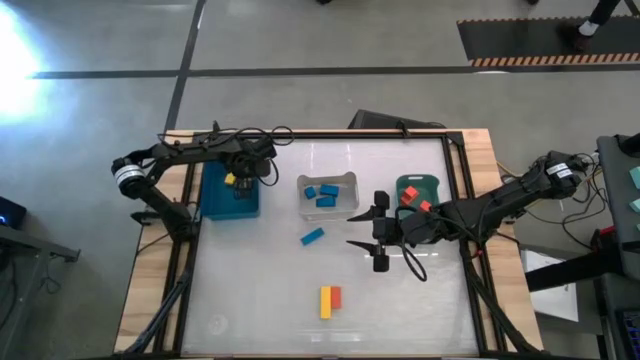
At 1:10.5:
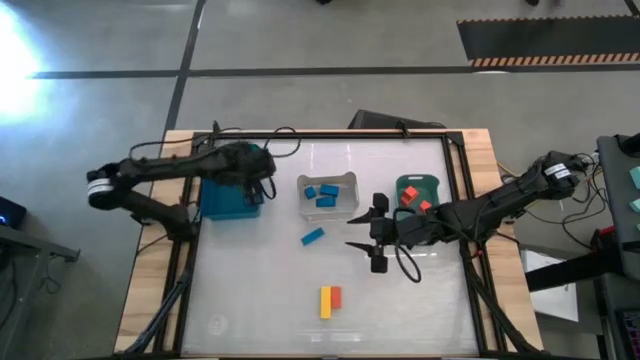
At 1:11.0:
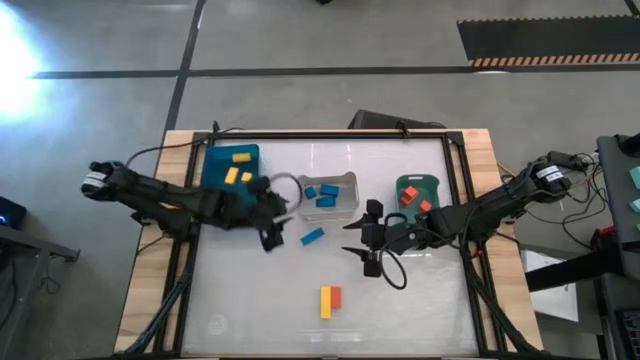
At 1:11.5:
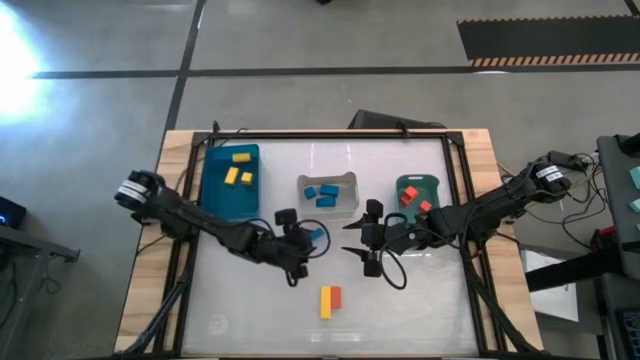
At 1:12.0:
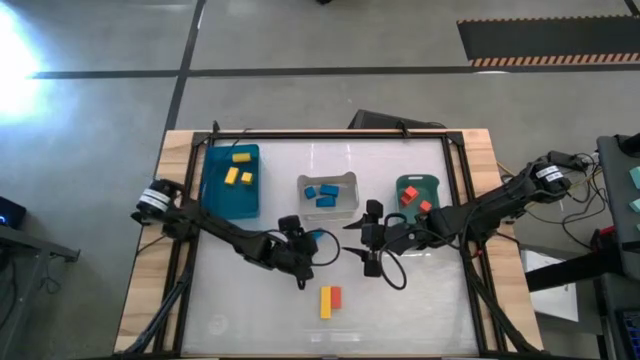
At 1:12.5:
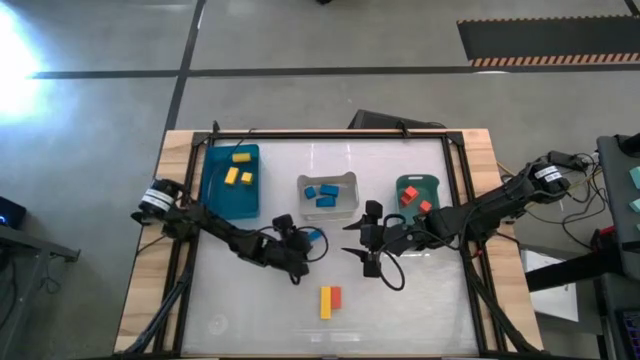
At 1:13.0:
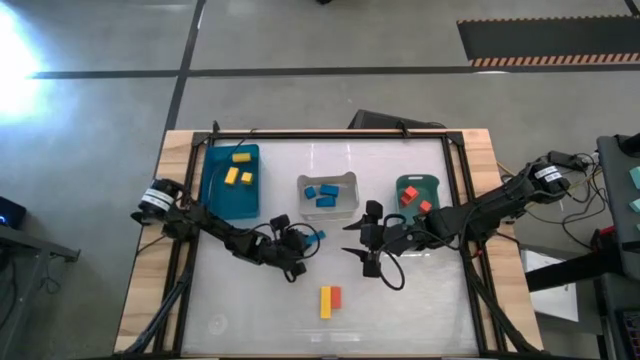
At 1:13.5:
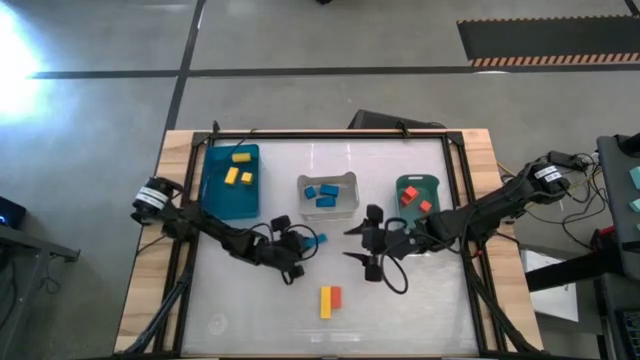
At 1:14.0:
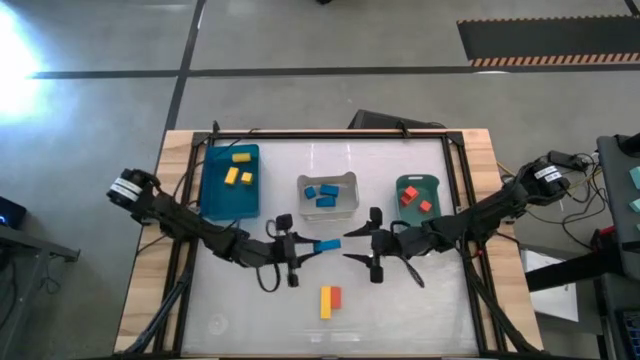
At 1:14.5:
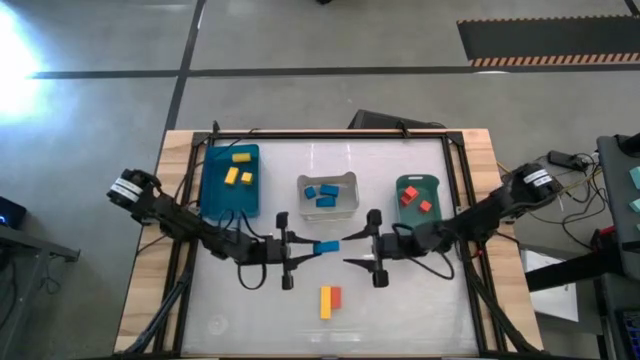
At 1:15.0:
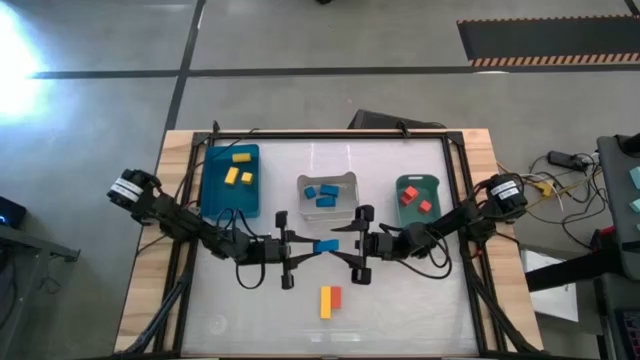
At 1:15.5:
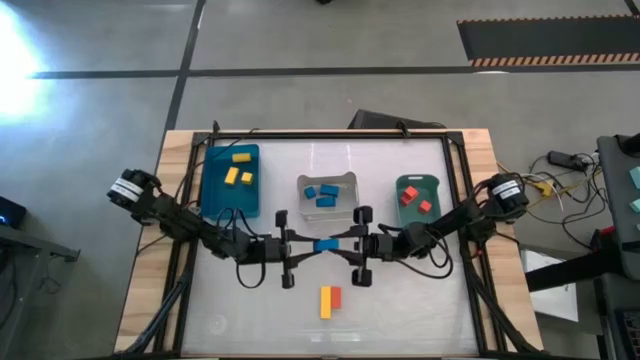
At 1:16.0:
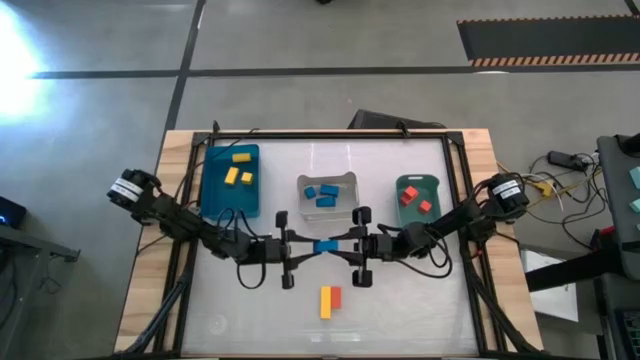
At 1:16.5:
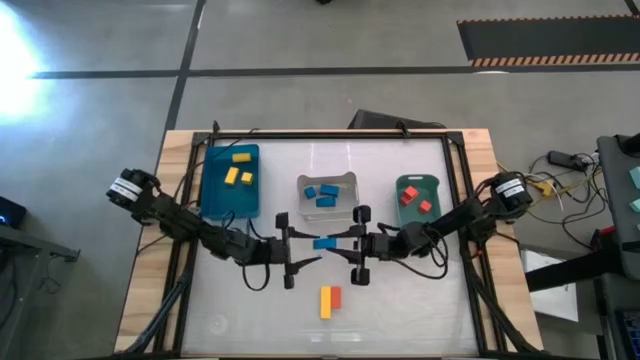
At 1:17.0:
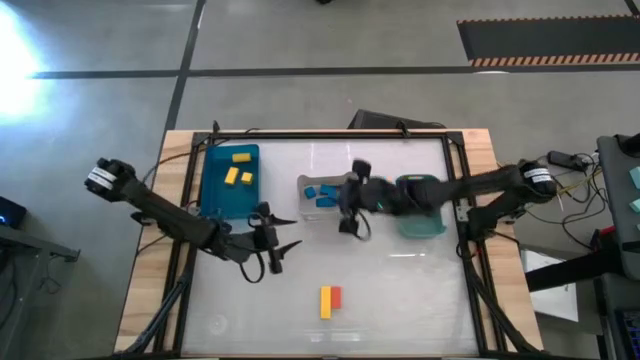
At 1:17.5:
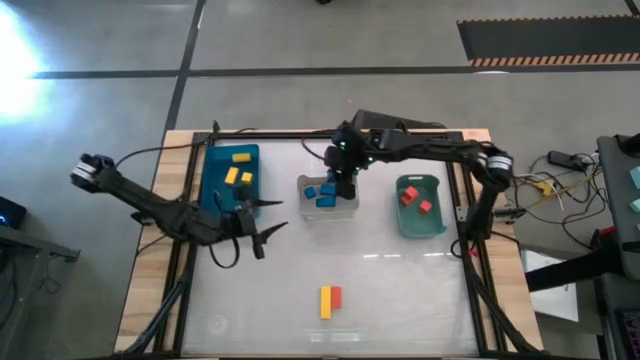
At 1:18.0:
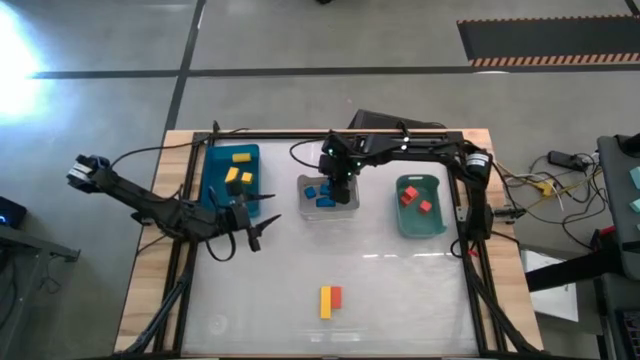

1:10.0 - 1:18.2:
Task: Sort & place blocks by color
Put the blue block into the gray bin

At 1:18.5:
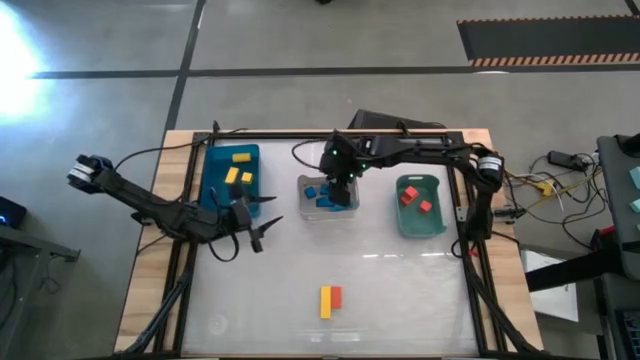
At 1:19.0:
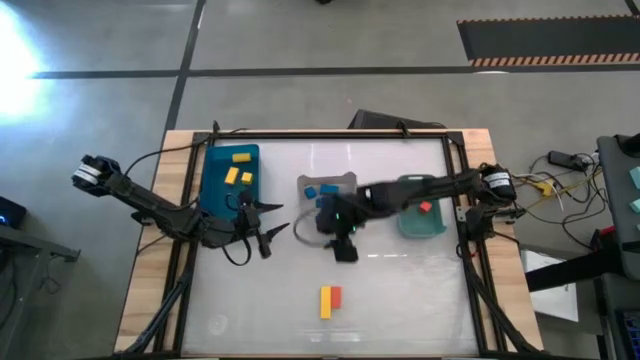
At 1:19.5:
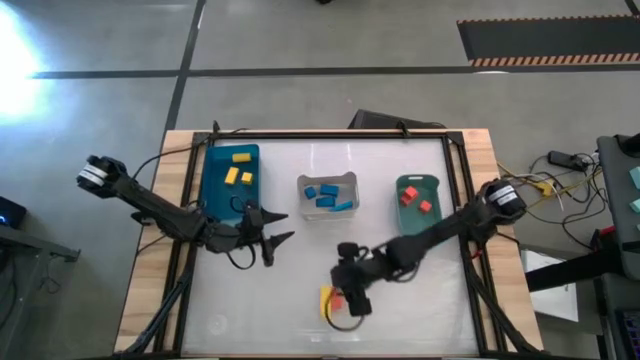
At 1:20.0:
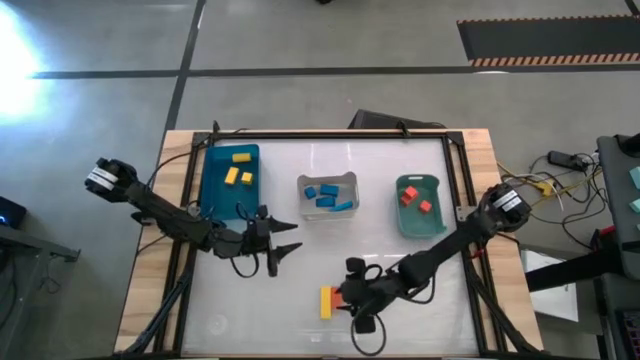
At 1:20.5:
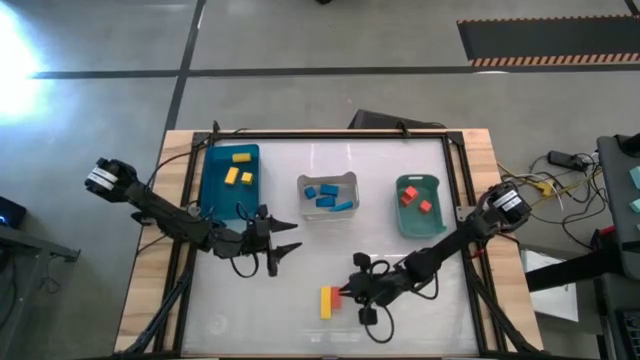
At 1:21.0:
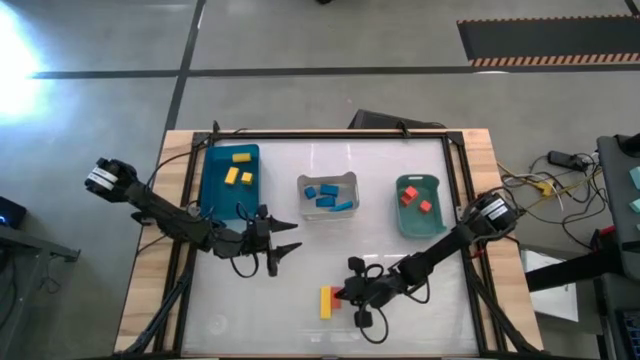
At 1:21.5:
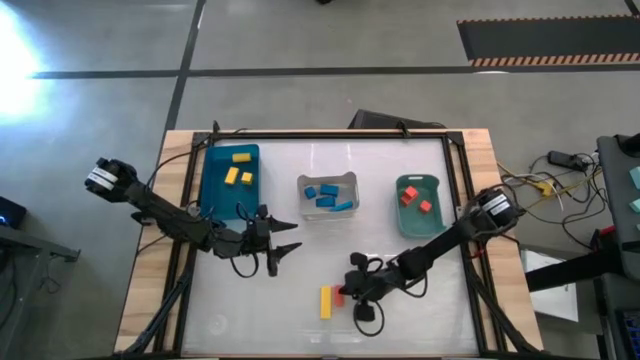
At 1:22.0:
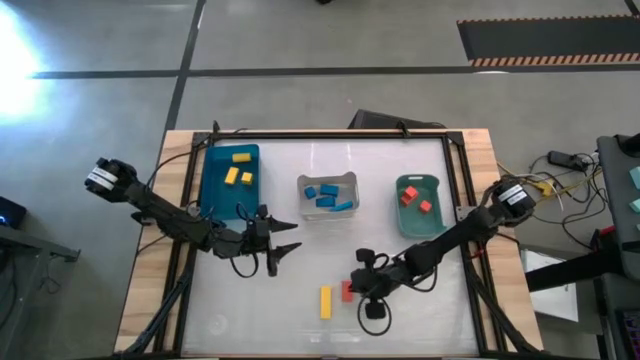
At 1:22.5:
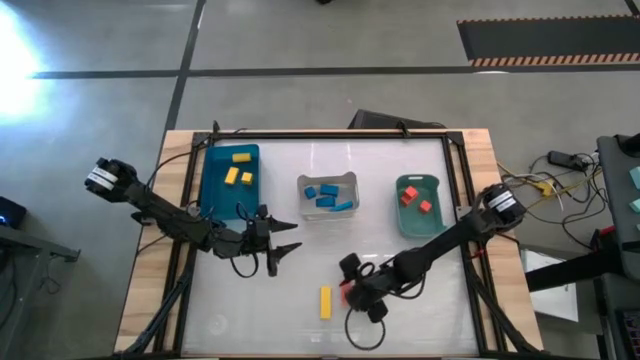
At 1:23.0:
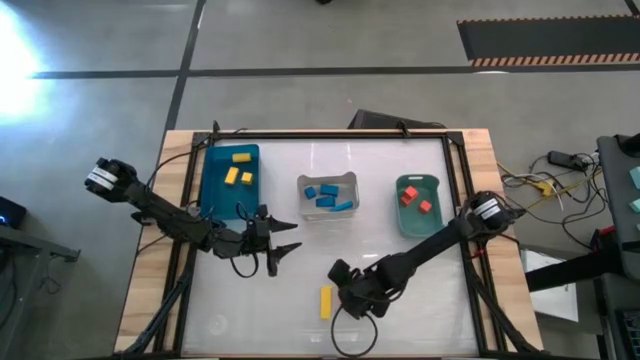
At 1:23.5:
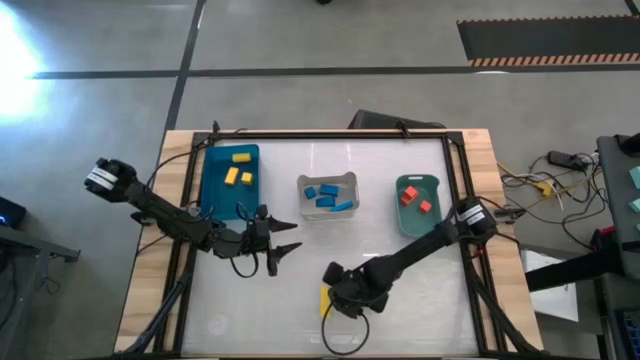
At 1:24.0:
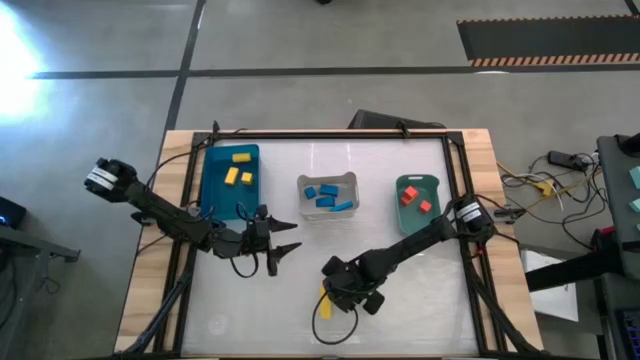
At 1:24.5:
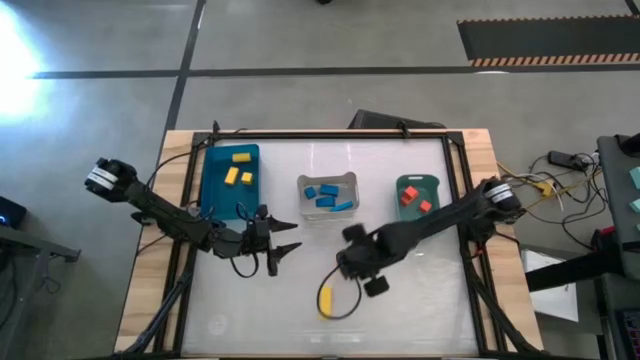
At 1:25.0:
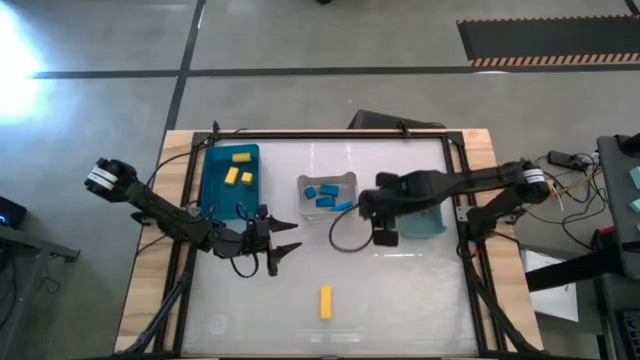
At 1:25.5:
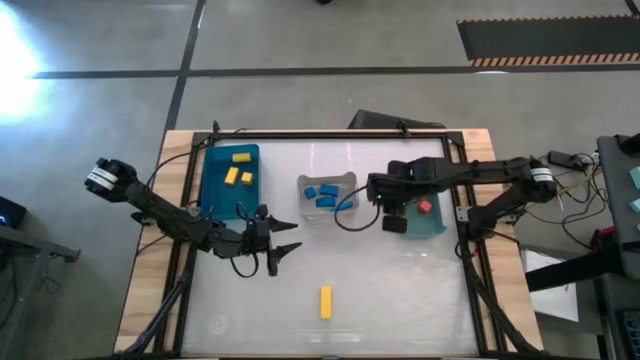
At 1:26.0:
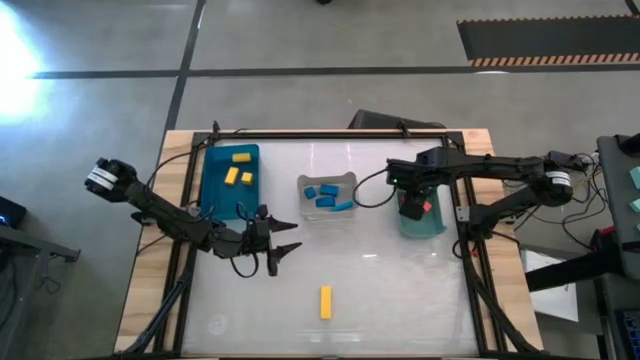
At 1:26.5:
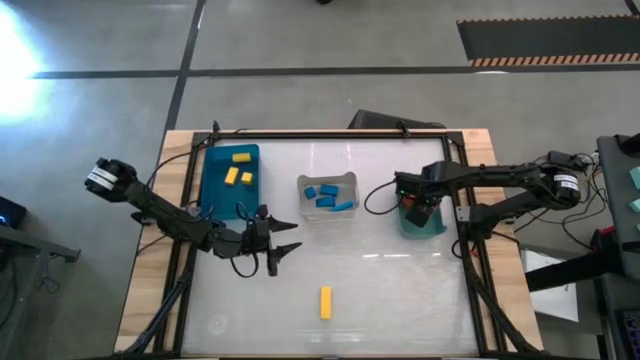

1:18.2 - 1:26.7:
Put the orange block into the green bin

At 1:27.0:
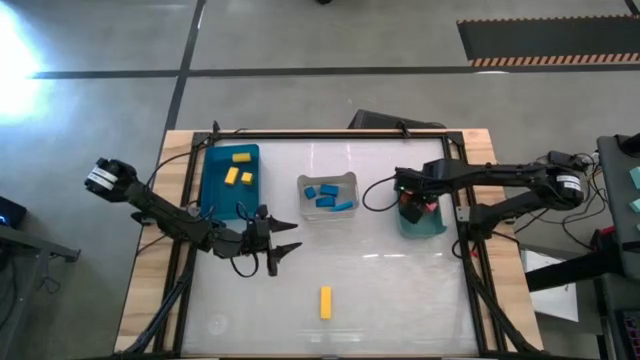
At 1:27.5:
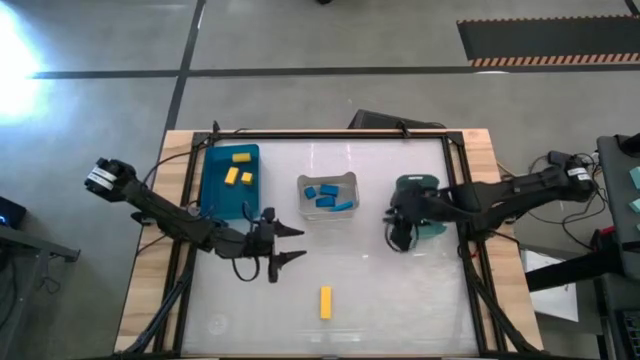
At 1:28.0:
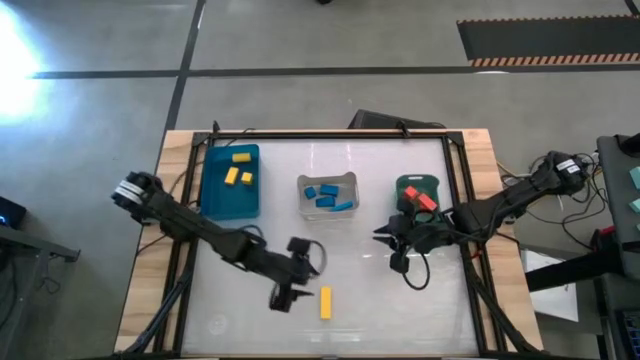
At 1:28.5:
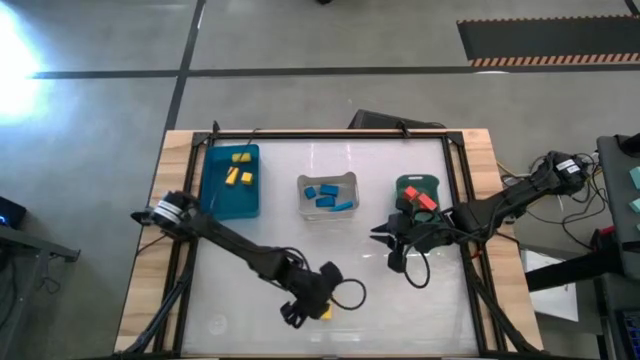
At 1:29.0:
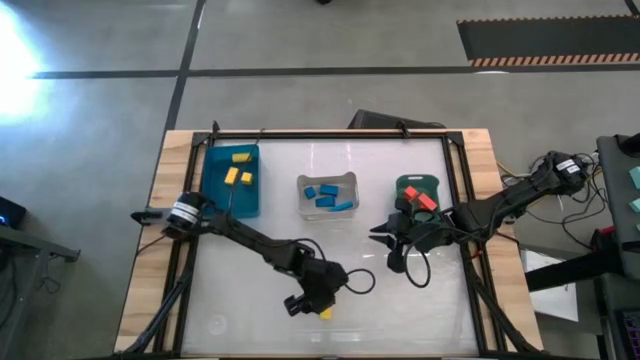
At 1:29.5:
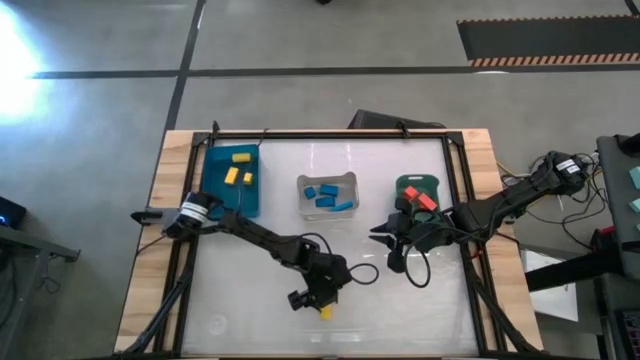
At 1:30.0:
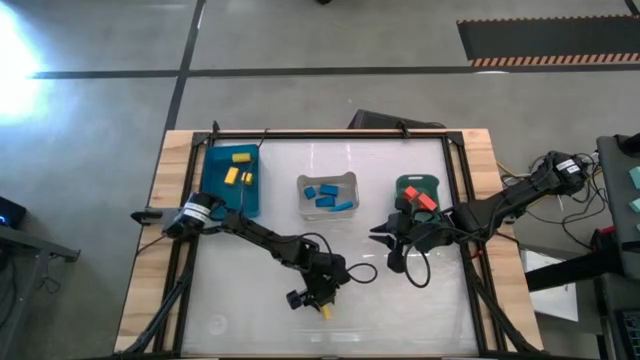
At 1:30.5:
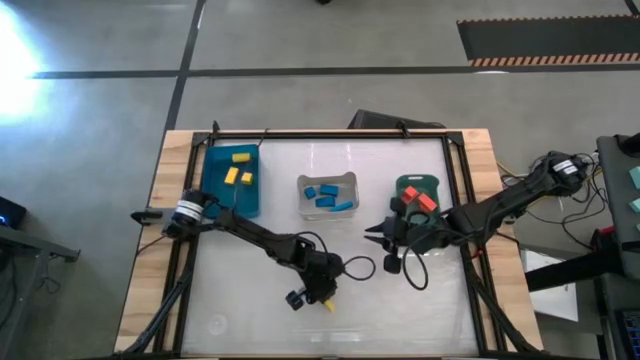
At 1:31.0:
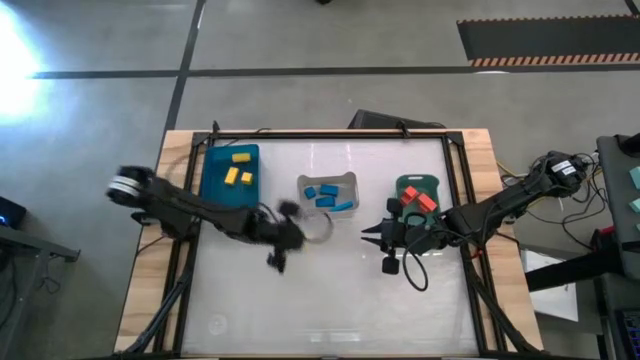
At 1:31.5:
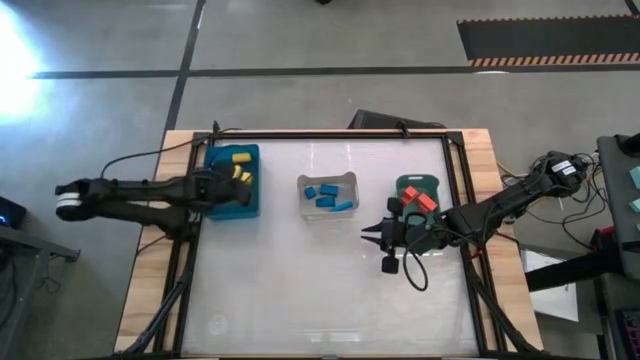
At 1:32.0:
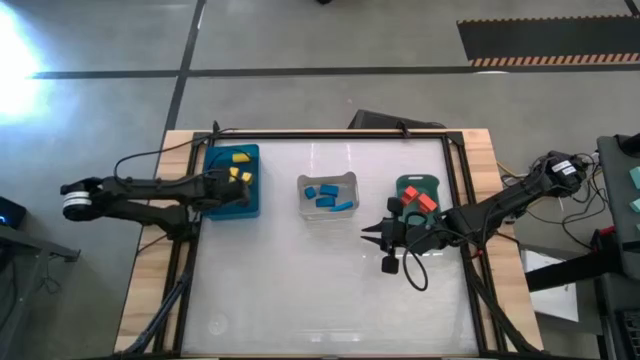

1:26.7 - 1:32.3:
Put the yellow block into the blue bin
